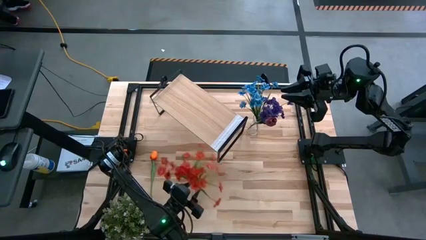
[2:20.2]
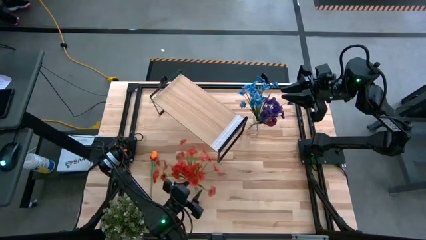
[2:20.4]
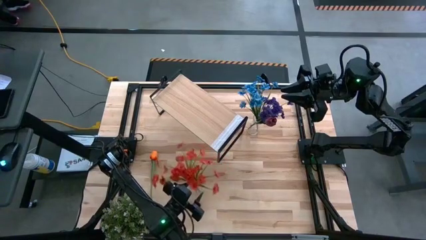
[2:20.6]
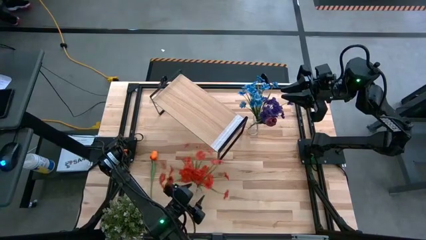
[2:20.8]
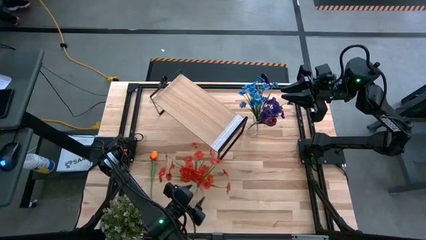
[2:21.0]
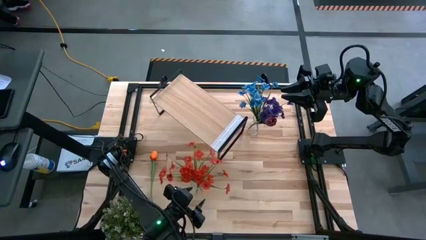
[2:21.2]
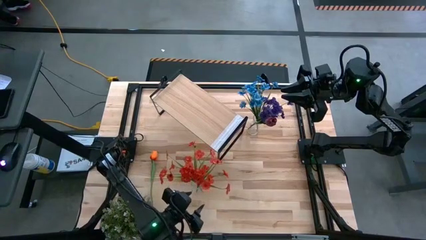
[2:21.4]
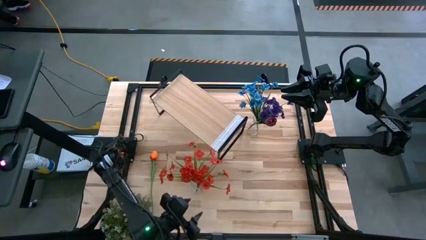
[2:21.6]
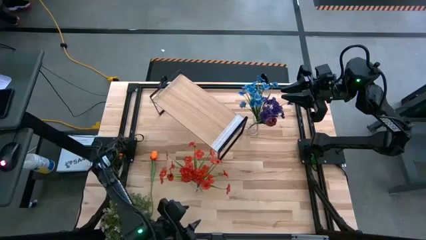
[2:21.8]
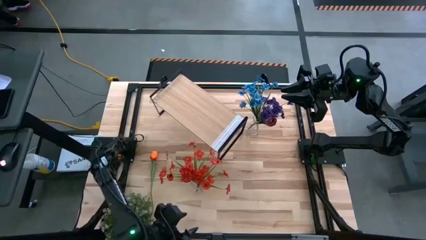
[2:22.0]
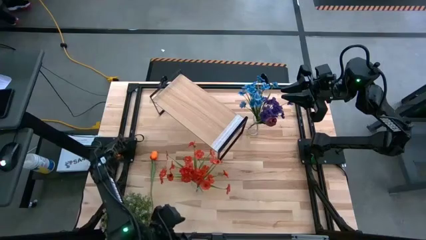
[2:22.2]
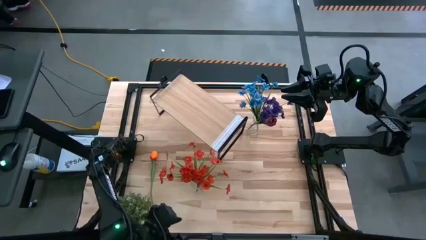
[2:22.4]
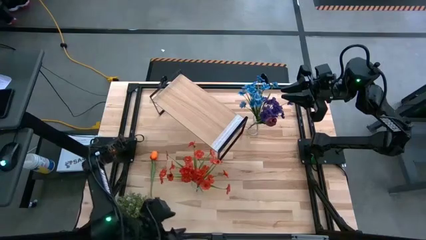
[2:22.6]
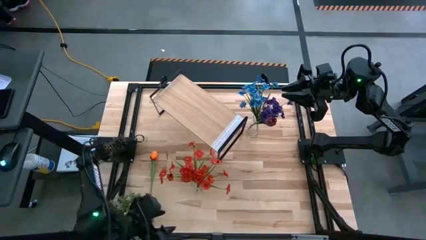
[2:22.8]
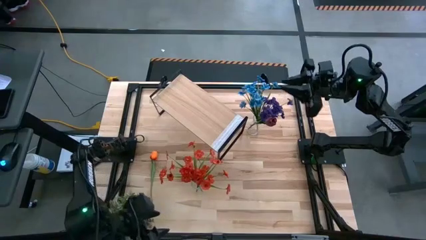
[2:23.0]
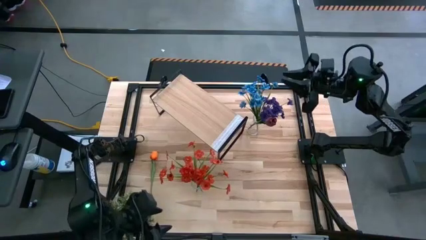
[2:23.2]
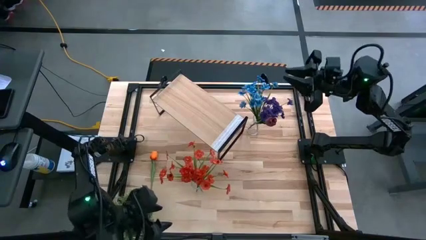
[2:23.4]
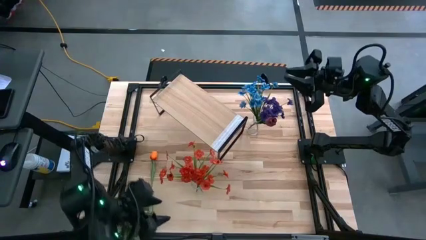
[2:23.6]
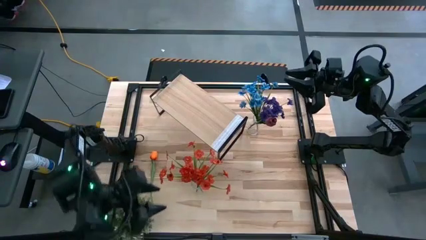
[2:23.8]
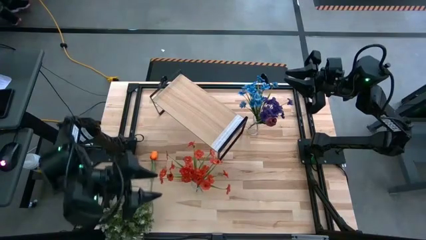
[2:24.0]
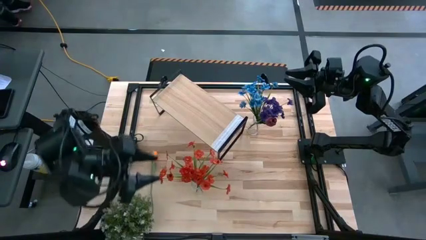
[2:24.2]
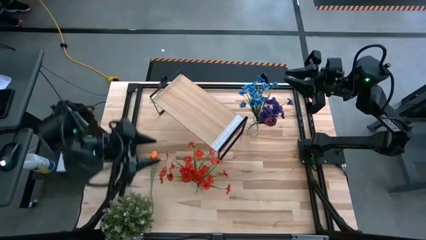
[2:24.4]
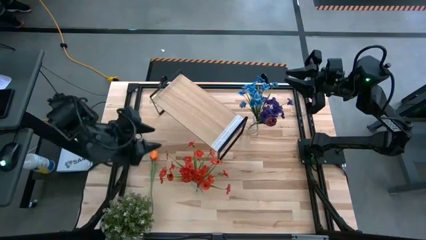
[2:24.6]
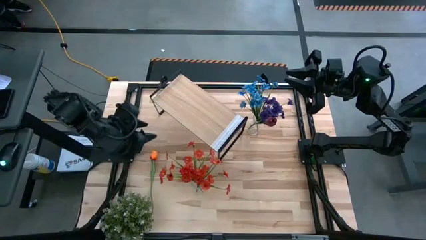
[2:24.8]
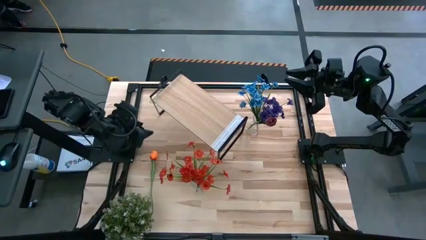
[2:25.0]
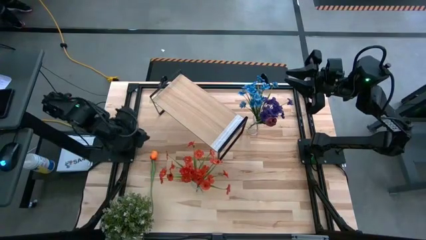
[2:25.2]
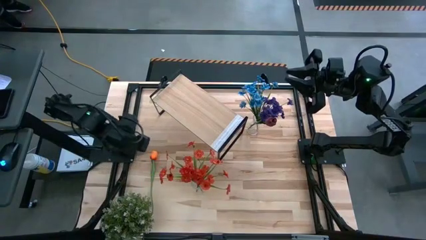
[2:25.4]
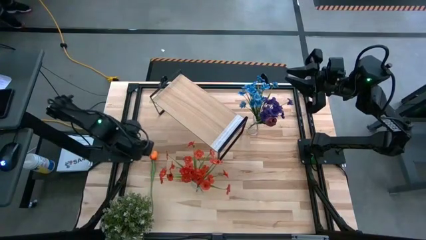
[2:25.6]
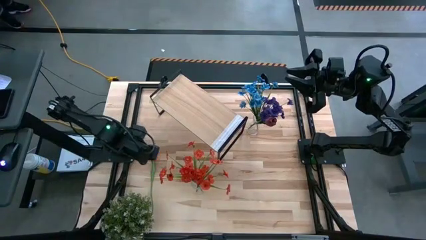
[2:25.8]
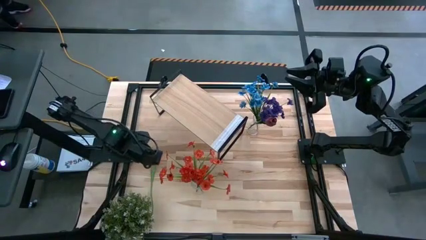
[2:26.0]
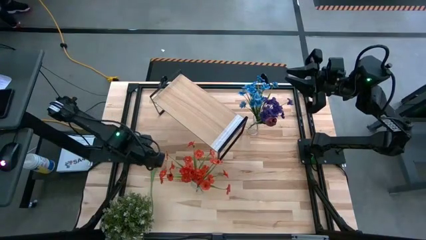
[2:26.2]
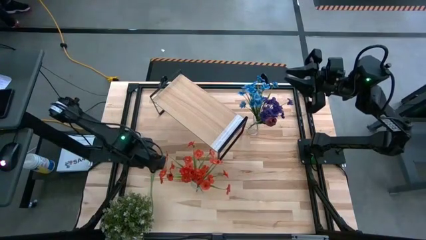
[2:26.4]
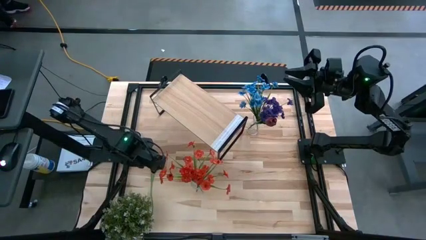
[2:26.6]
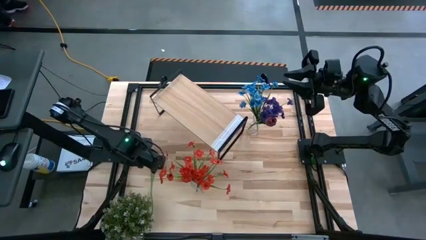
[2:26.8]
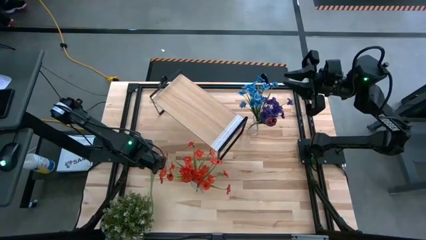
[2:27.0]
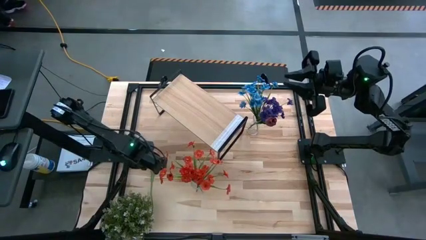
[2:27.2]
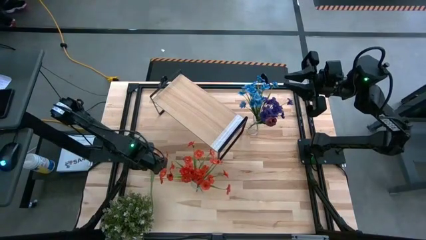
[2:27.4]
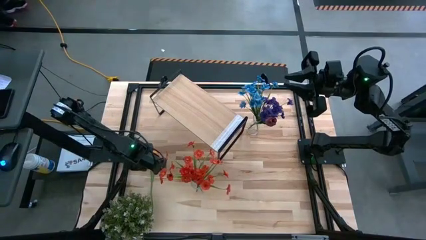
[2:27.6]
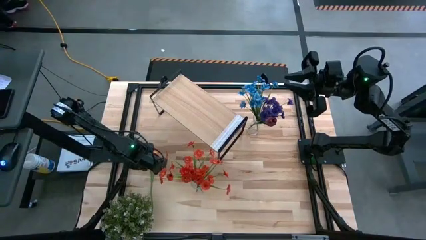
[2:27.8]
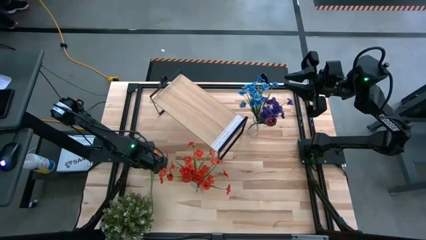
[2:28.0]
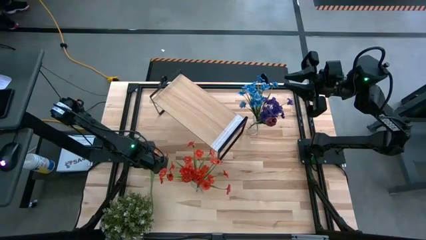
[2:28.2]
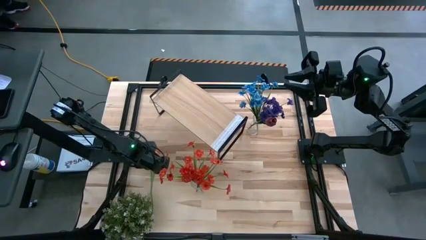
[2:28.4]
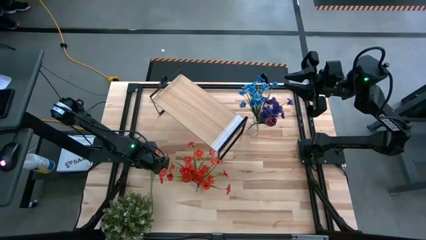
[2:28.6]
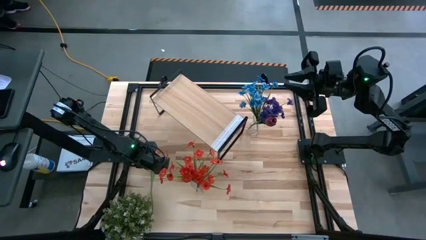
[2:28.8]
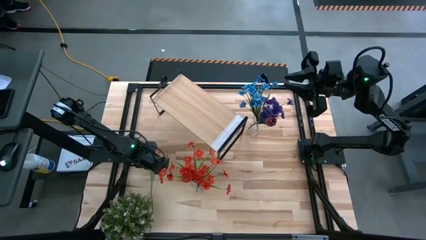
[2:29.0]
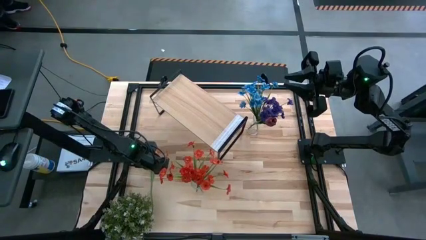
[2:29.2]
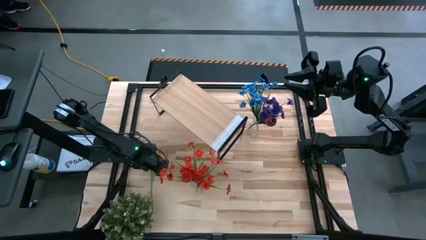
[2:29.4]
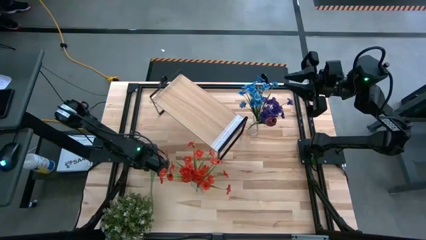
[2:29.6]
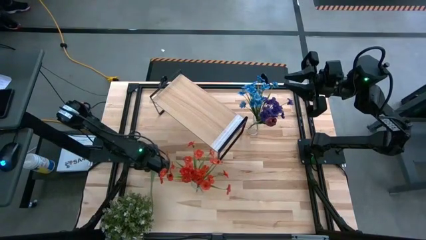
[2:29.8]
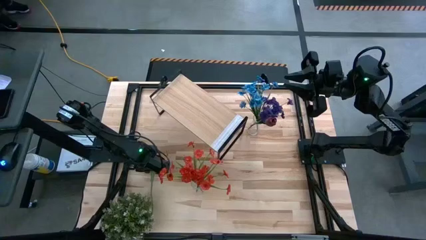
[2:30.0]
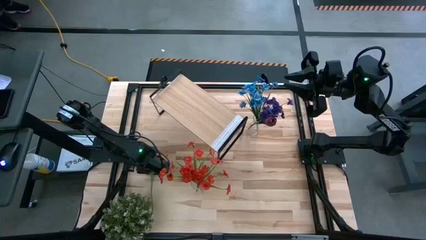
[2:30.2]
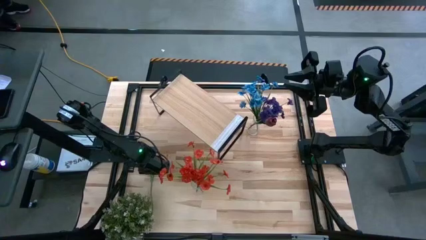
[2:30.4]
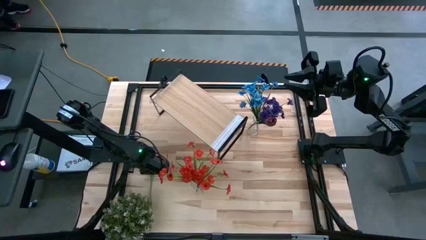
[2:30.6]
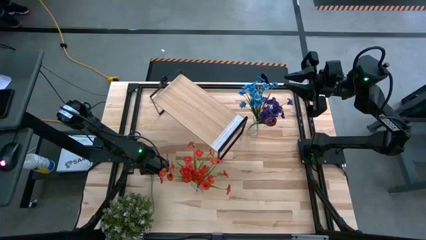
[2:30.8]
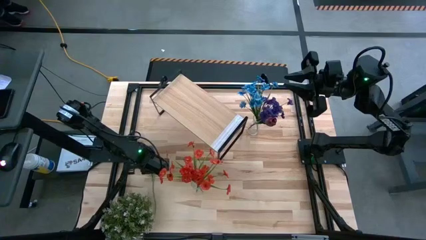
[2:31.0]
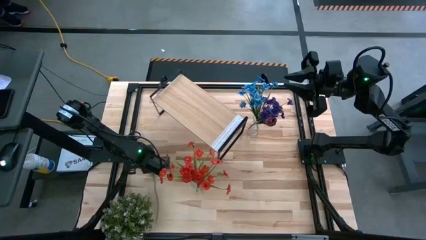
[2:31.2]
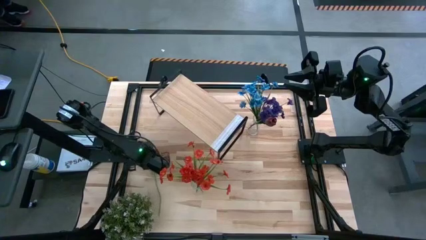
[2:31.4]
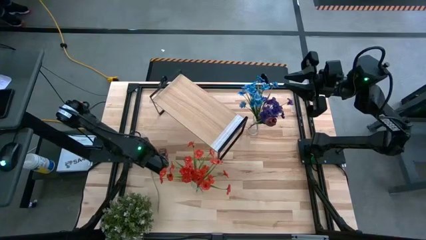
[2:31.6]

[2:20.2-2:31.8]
Task: Pick and place flowers into a vace then onto a shelf
Put the orange flower into the bottom transparent vase

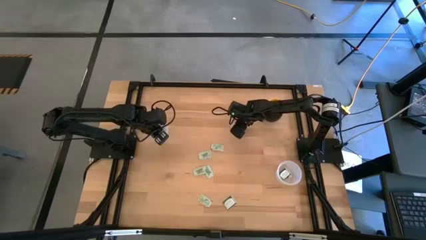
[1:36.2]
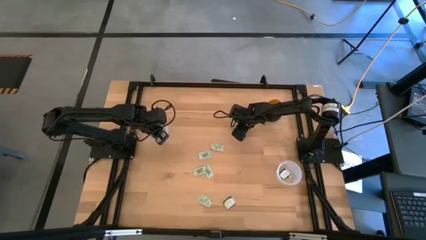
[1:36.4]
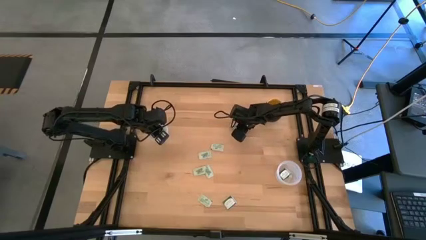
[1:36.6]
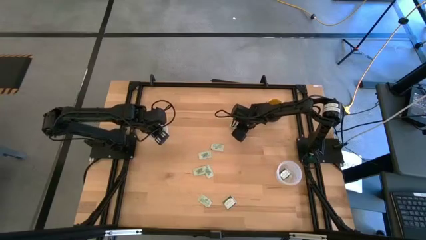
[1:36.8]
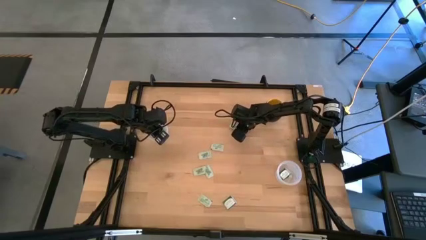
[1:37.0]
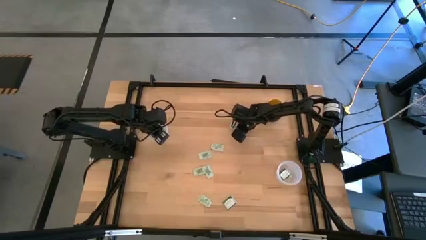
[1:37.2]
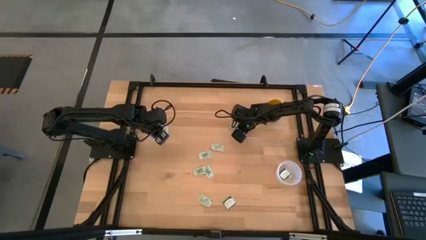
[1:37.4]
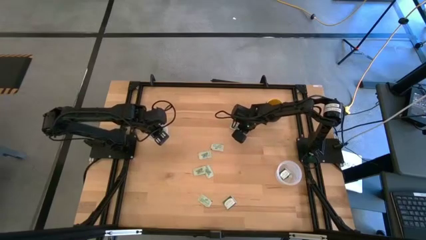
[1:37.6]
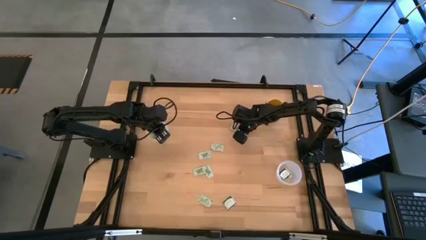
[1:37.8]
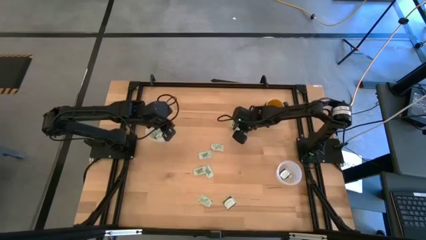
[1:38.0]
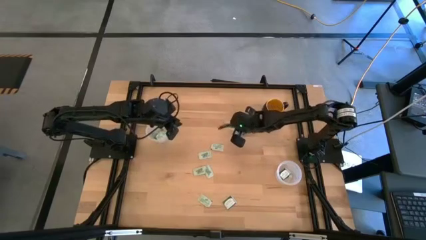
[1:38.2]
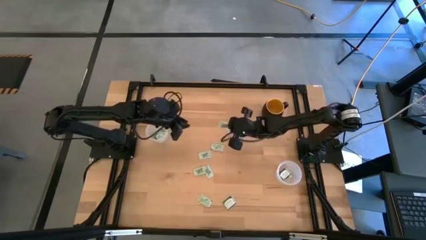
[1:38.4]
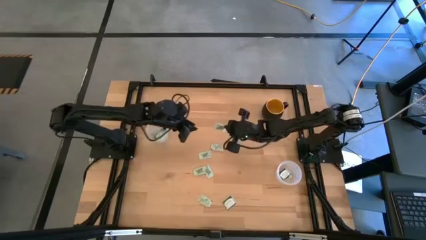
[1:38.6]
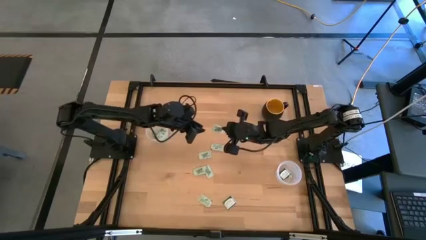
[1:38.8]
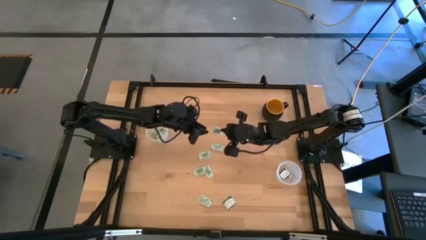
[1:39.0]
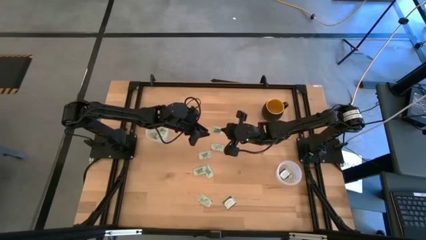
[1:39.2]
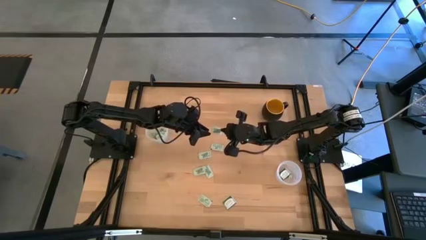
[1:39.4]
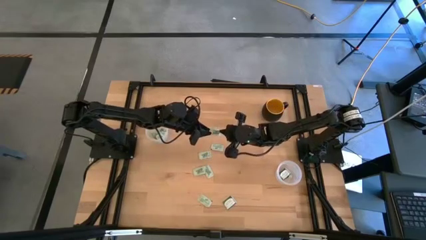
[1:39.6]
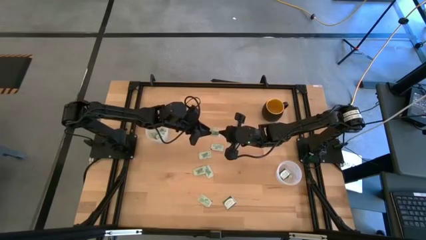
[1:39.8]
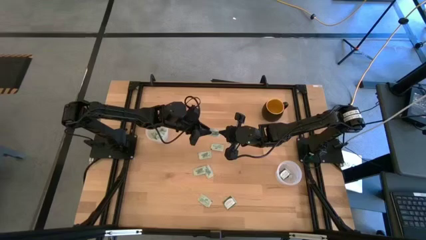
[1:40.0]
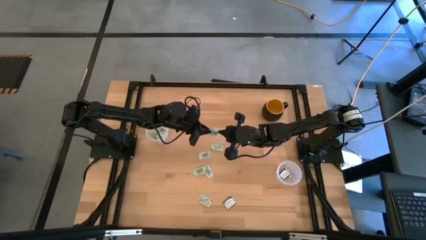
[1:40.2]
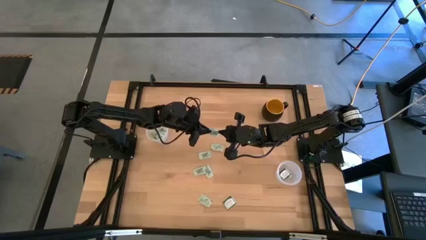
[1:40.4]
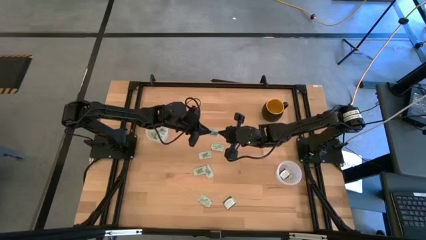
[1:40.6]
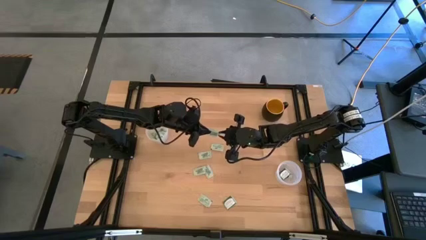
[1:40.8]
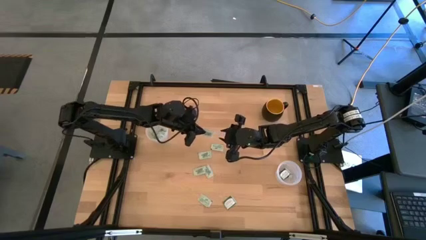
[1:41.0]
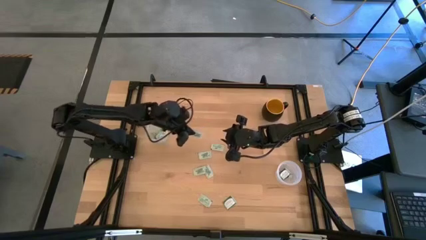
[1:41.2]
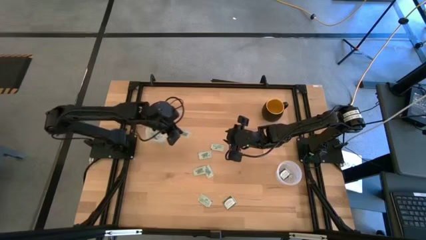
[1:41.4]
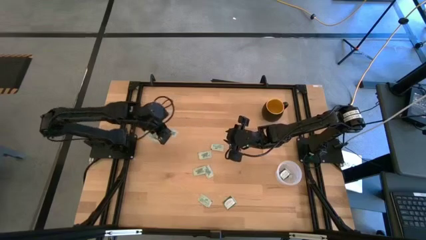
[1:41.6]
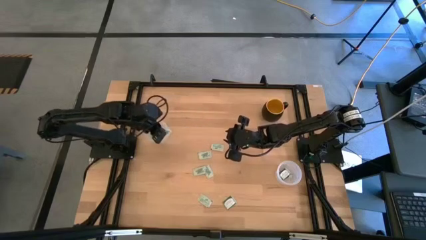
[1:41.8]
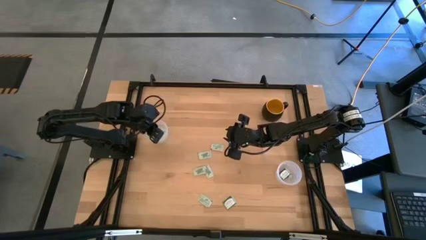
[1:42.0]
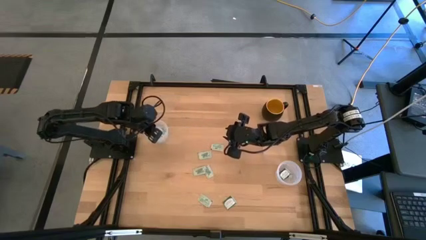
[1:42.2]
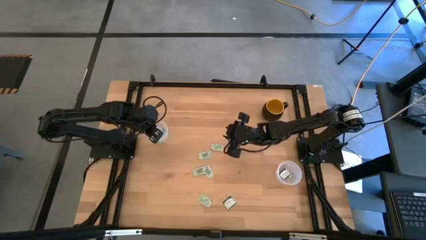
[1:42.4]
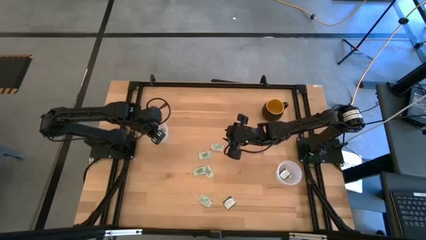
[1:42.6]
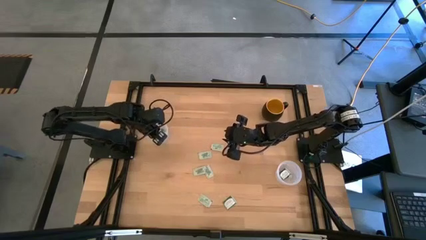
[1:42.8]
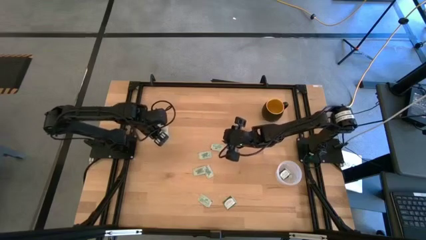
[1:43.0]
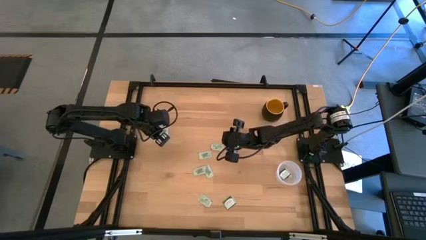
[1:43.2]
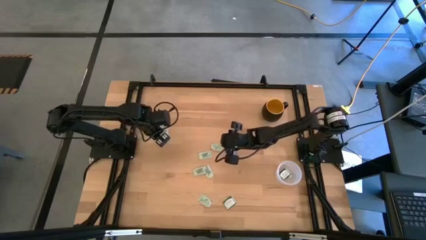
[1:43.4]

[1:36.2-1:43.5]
Task: Pick and place Stevia / Truvia into bins
Put the white stevia packet into the left transparent container
